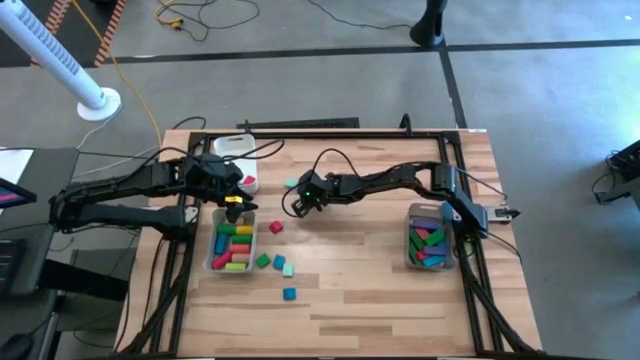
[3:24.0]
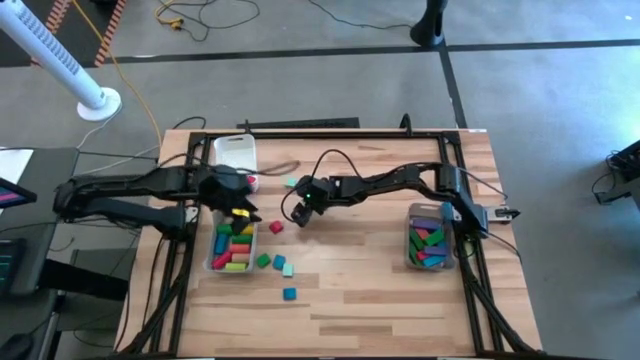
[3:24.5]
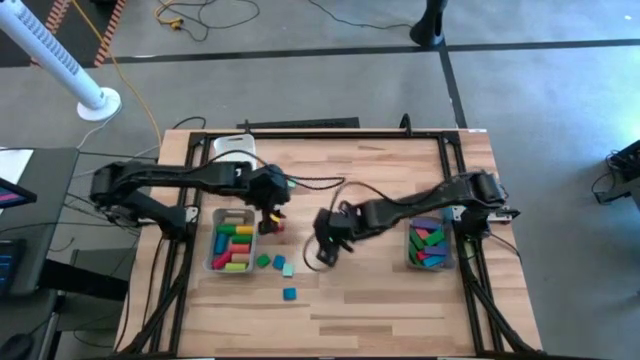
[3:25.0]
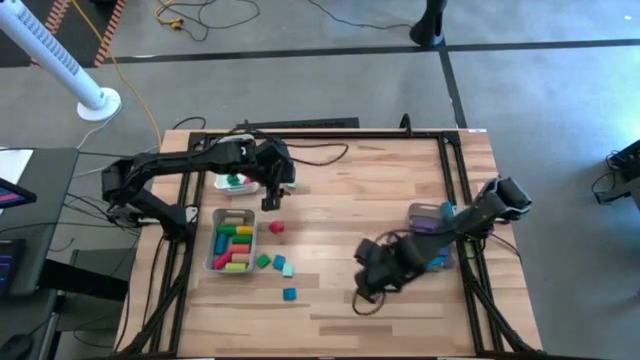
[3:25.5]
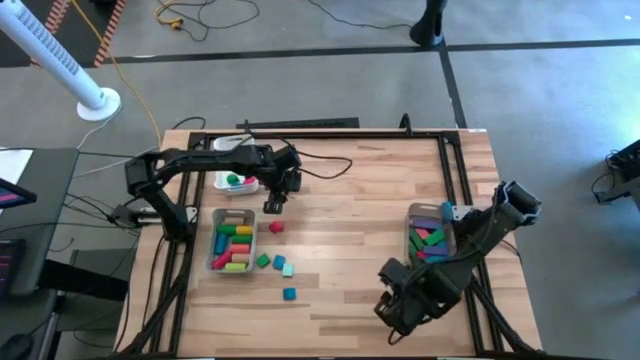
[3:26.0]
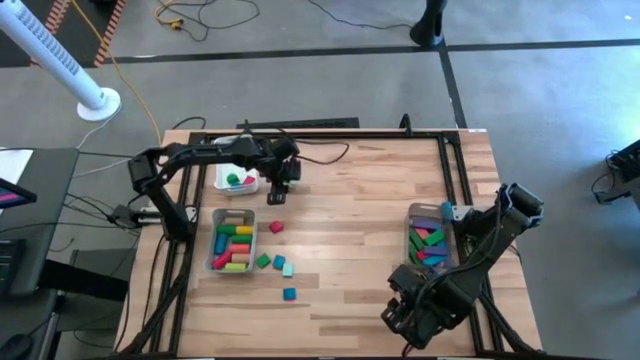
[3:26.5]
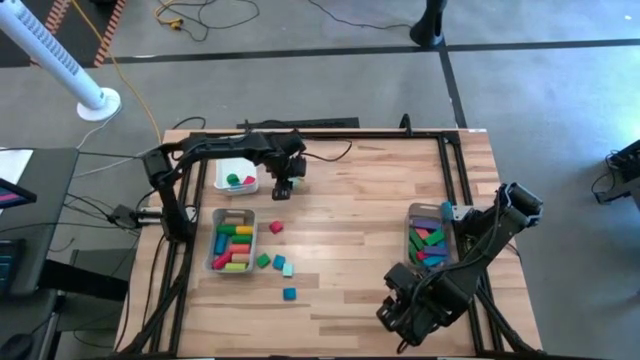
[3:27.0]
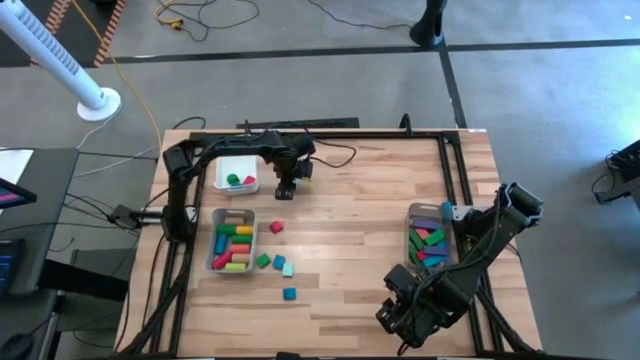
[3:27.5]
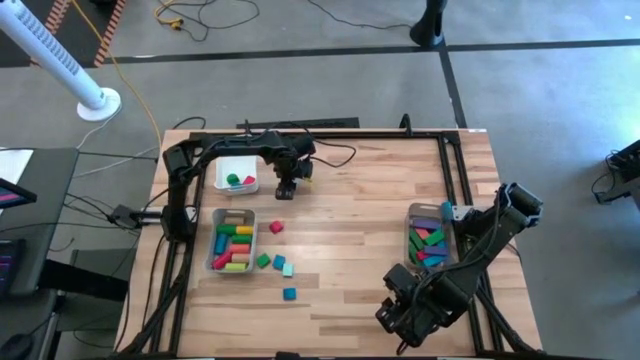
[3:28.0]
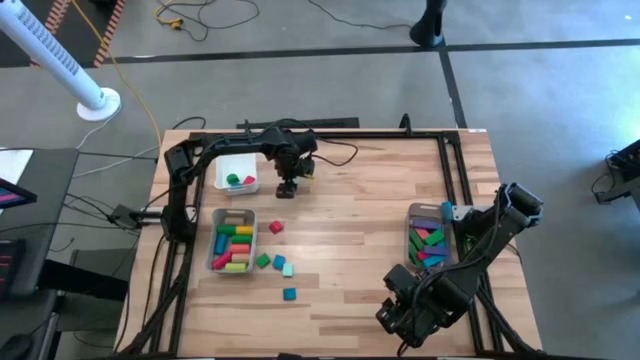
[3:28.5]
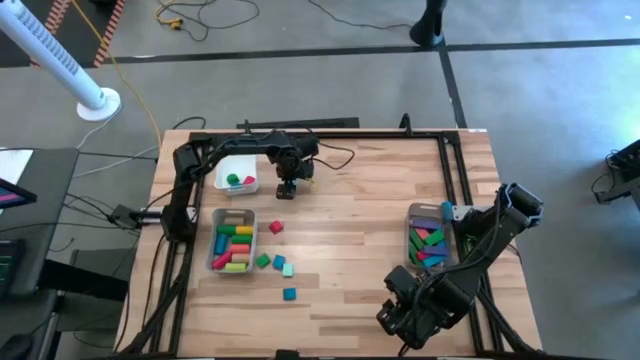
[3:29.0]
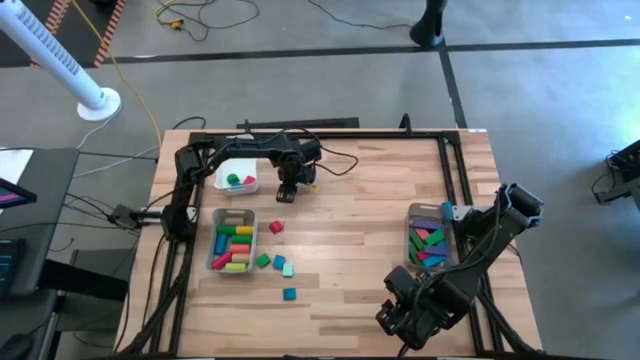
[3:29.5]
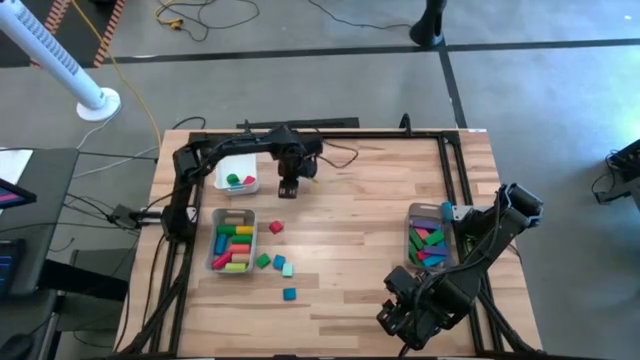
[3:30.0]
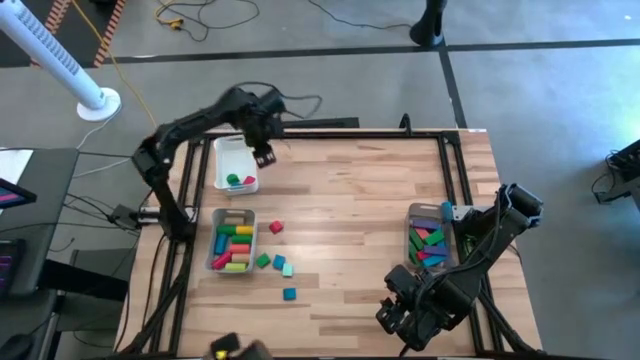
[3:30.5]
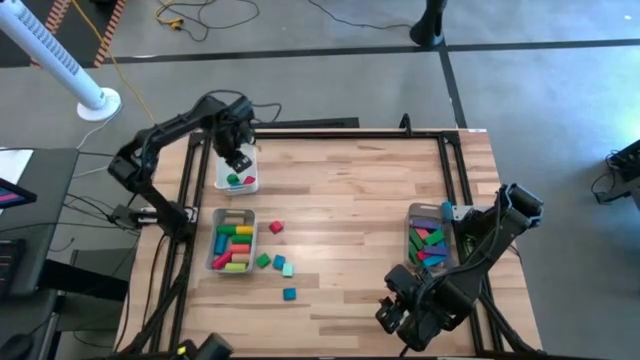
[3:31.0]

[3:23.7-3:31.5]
Task: Sort blocks by size
Put the light blue semicircular block into the white bin

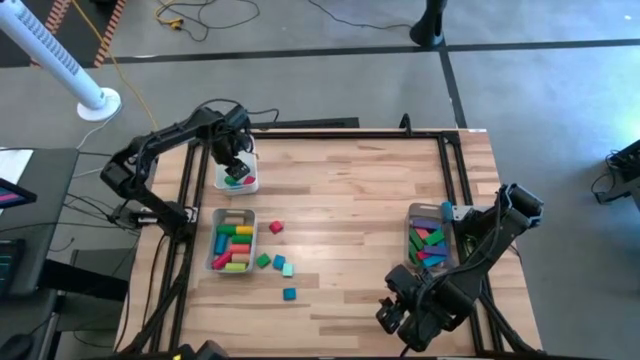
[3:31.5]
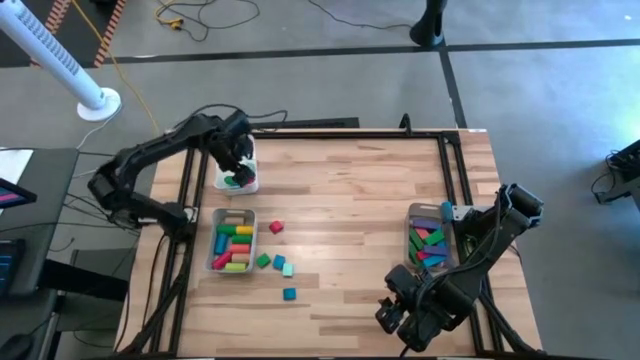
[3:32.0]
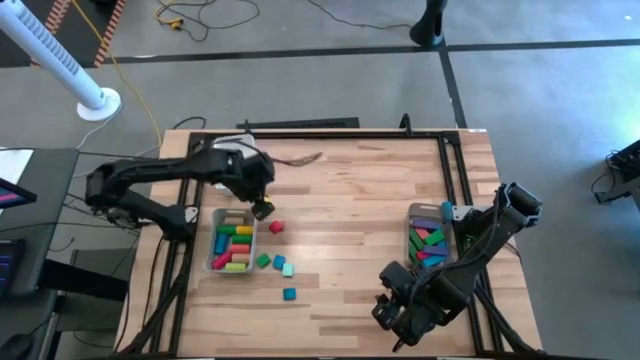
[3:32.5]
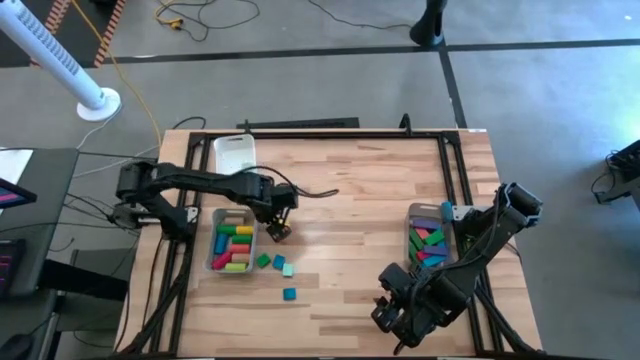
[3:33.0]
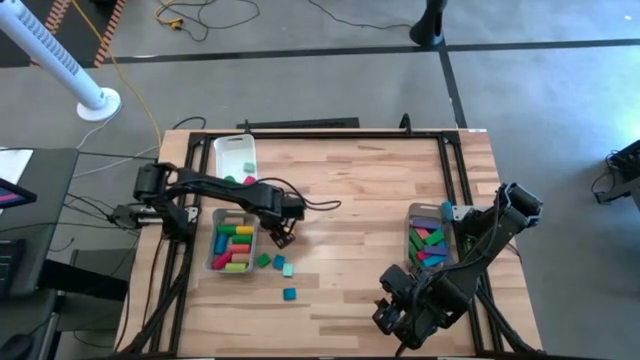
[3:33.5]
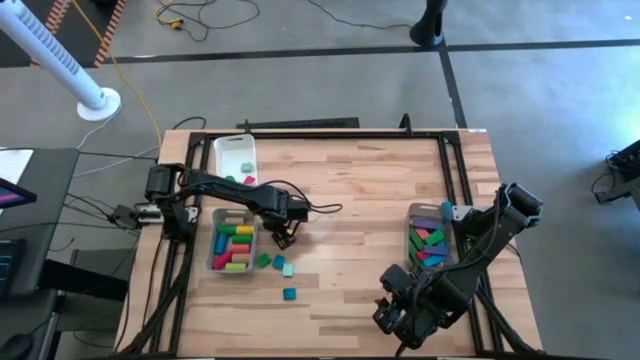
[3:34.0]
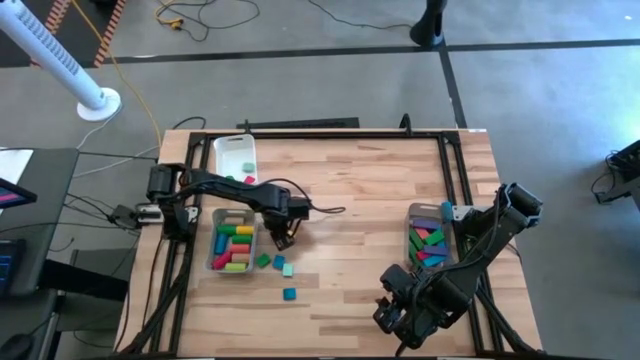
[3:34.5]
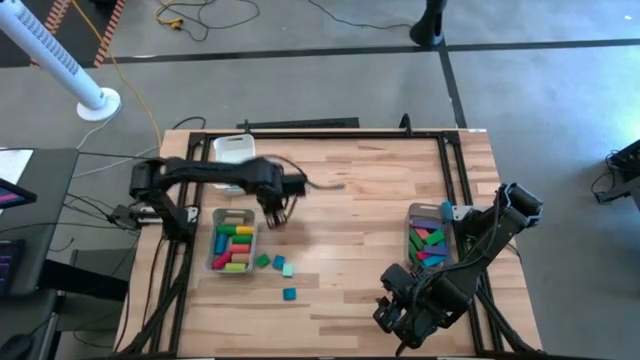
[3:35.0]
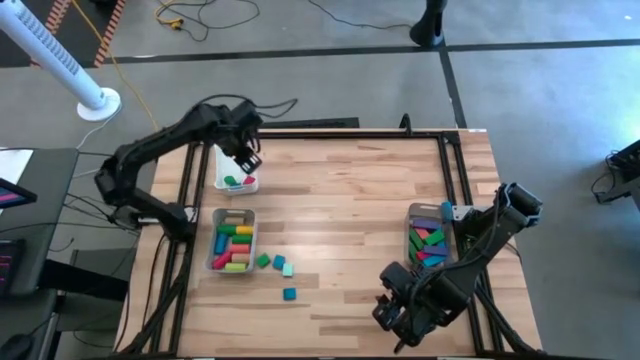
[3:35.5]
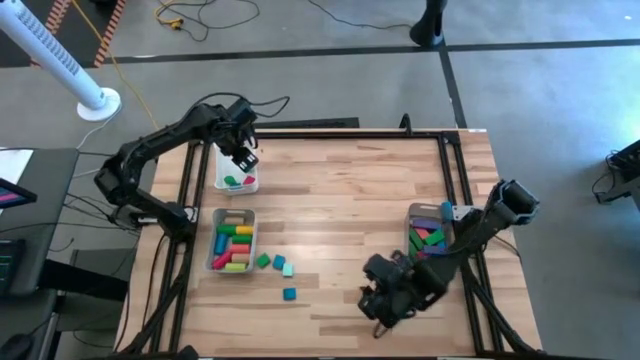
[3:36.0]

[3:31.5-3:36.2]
Put the red semicircular block into the white bin

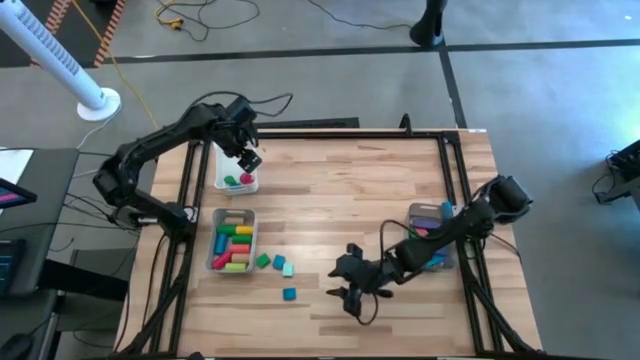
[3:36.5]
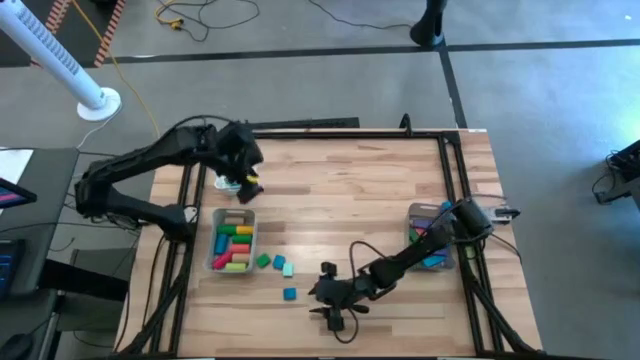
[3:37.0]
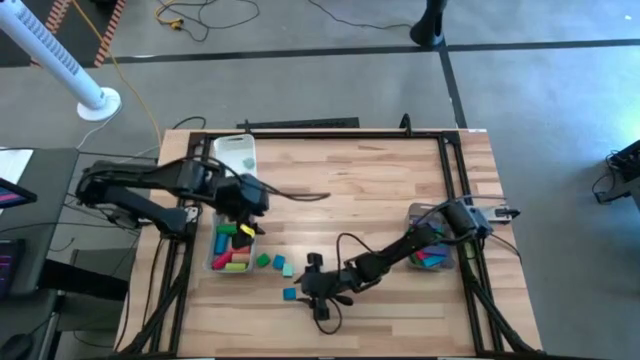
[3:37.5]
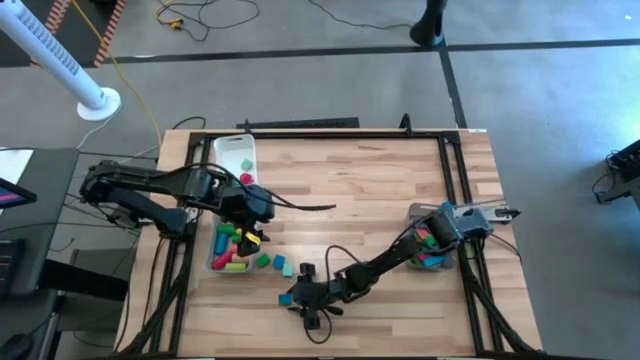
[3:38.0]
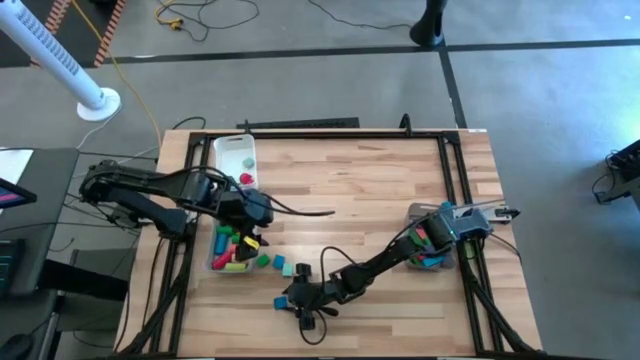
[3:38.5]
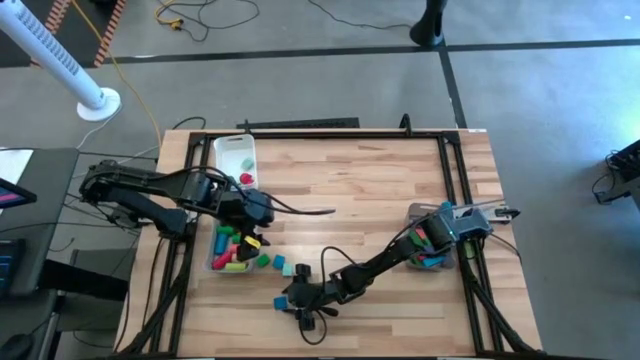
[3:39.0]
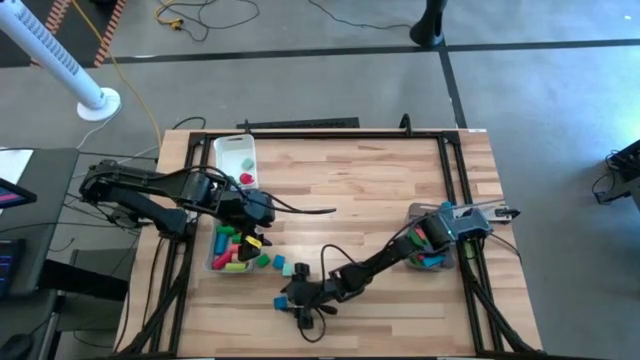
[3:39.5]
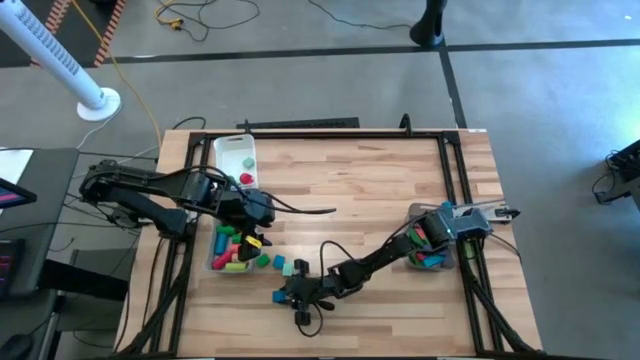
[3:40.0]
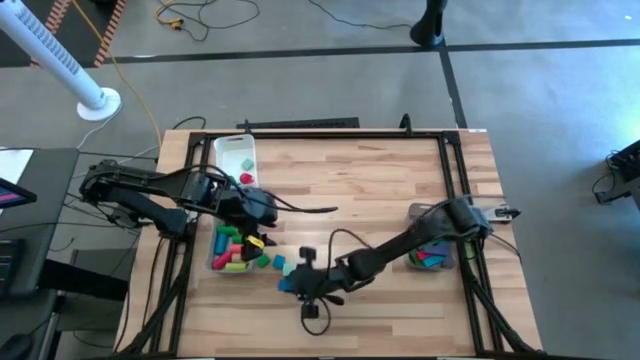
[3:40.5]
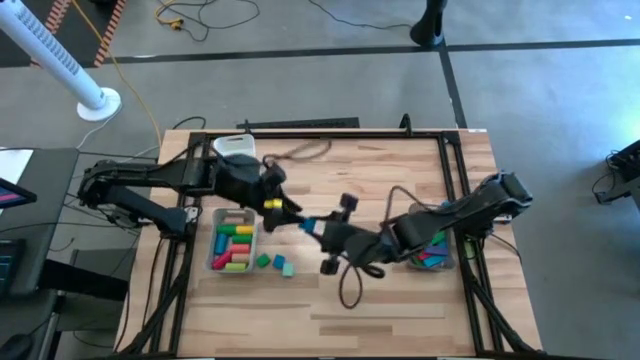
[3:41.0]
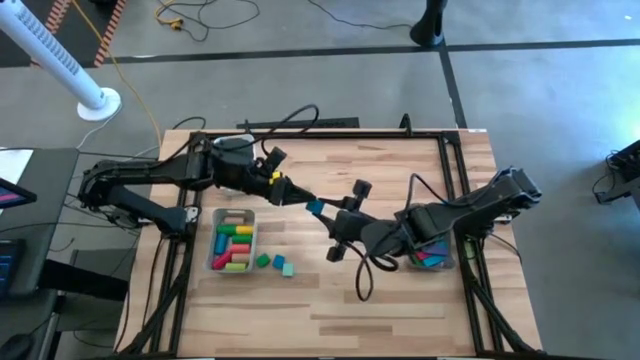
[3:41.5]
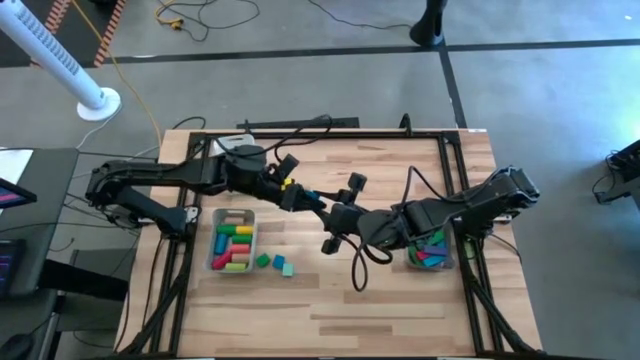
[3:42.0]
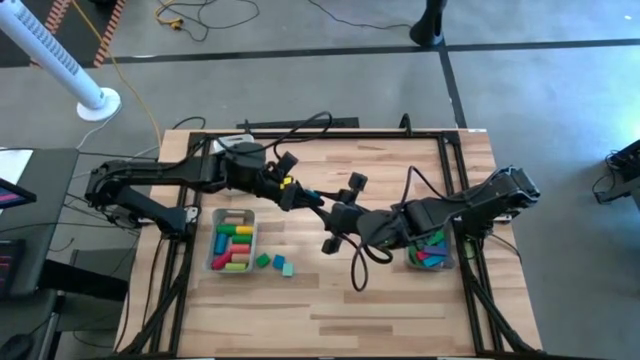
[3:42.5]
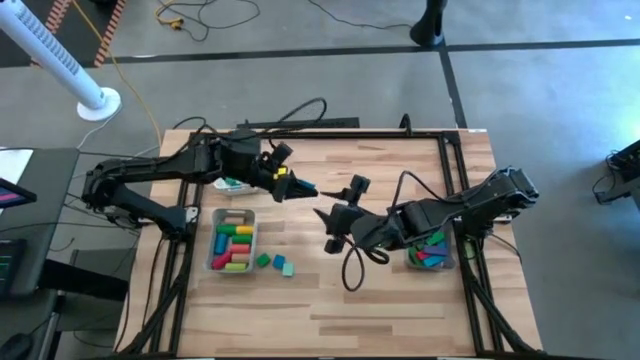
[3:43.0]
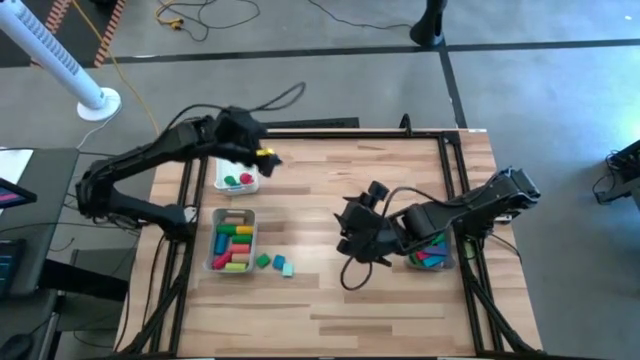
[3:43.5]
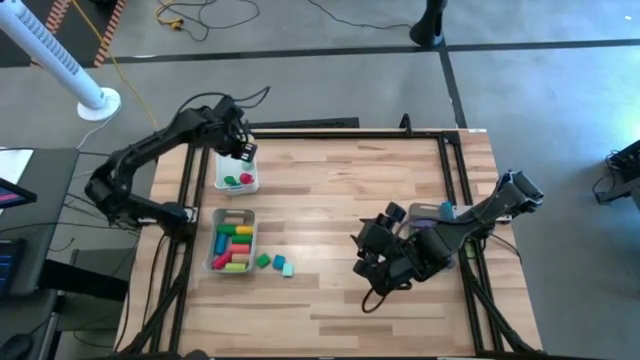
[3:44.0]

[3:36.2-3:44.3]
Put the blue semicircular block into the white bin

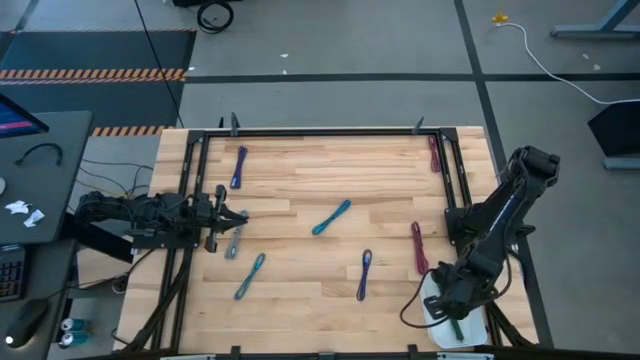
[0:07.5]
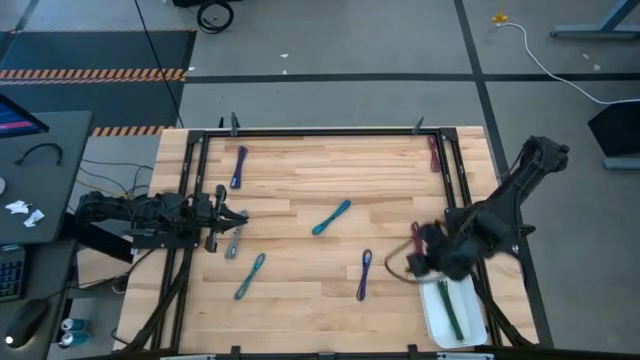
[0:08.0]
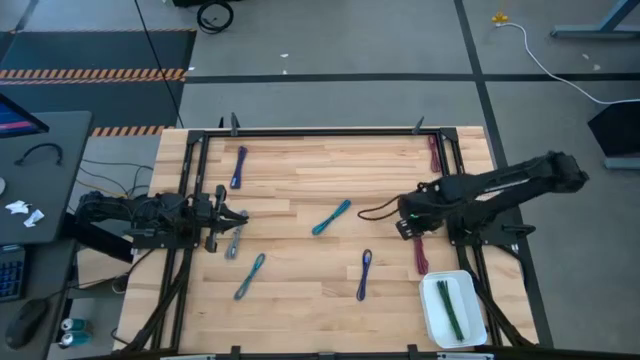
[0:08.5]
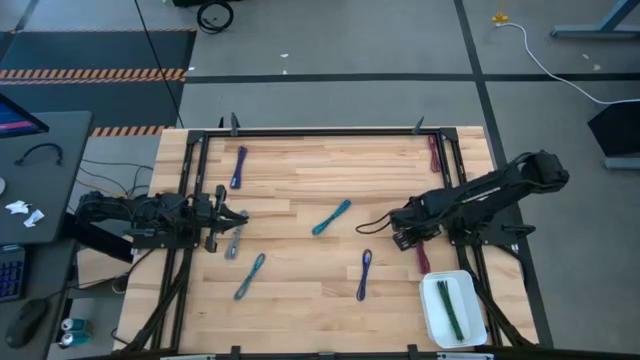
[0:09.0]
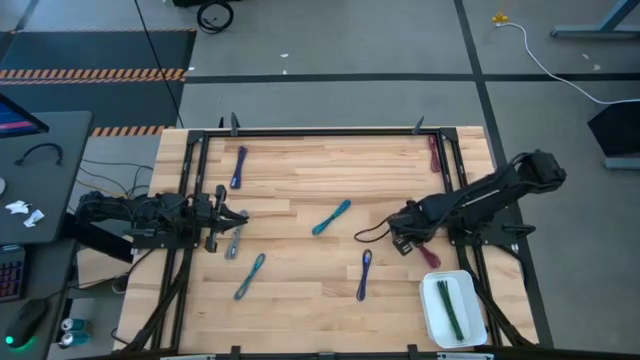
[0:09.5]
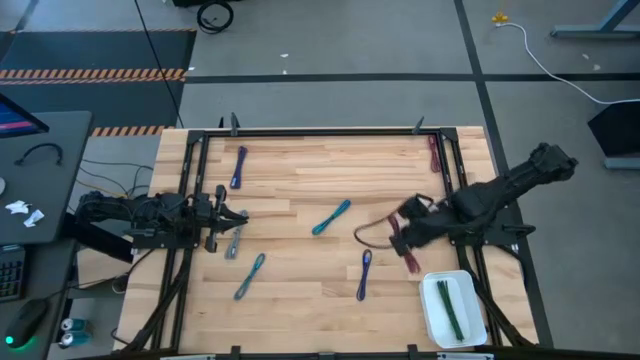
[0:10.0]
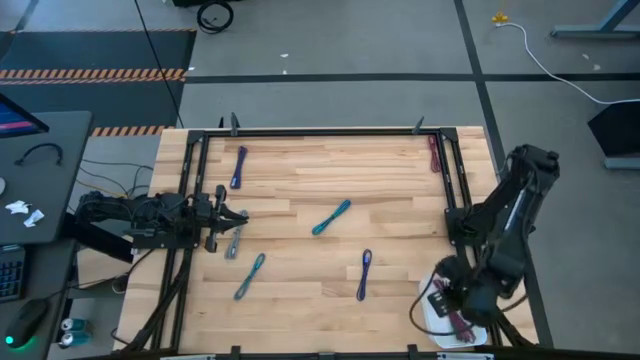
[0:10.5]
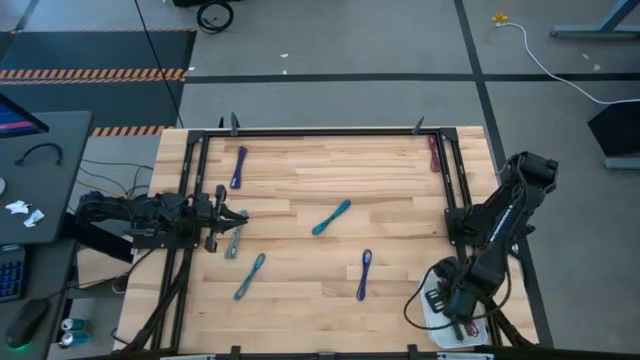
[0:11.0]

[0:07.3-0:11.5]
Task: Pick and place USB-C Cables
Put the bottom pink charger cable into the white bin
